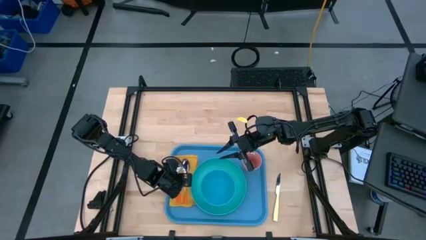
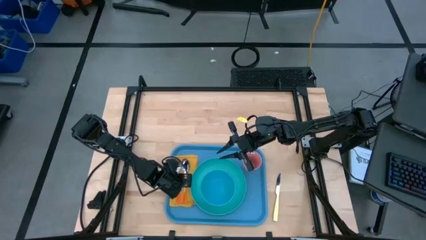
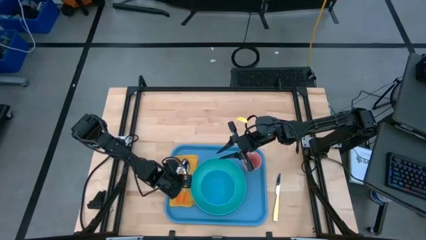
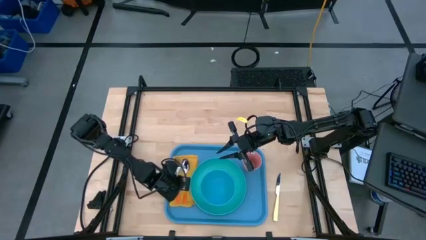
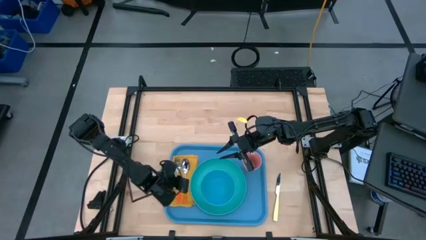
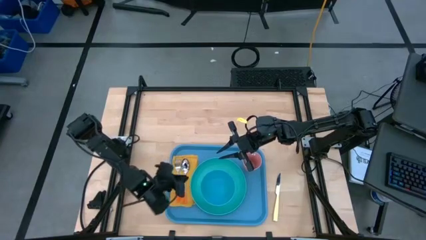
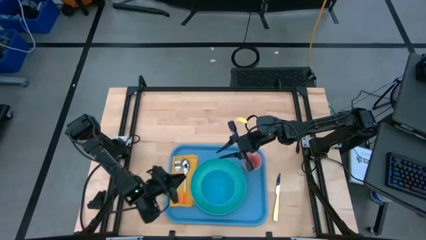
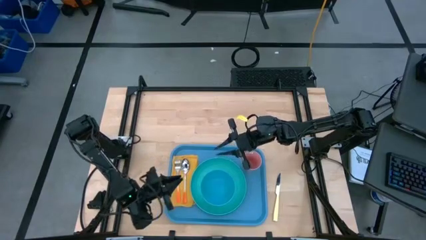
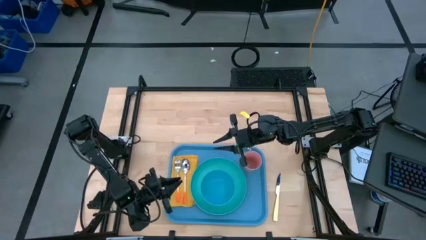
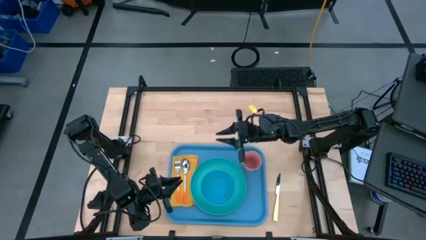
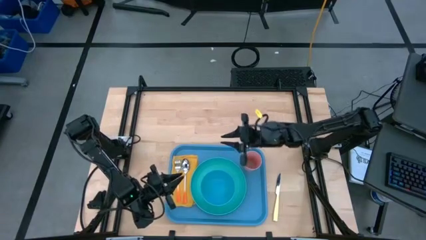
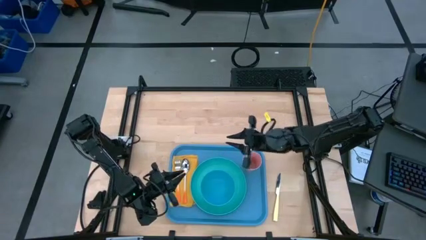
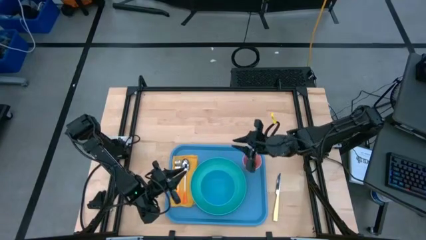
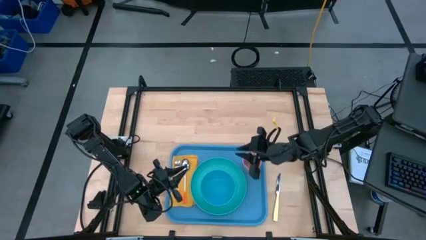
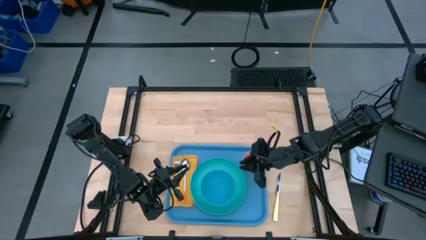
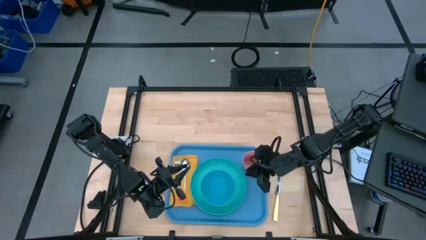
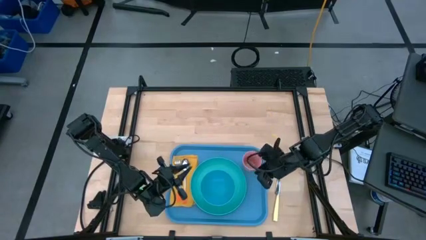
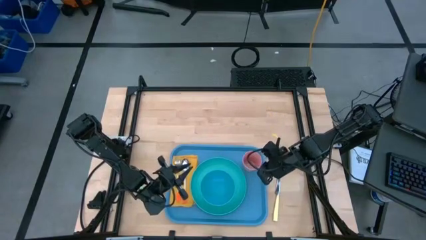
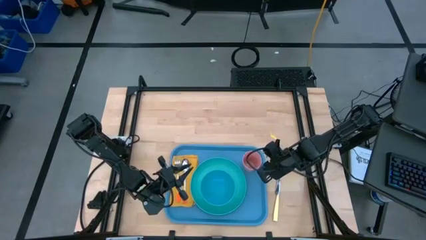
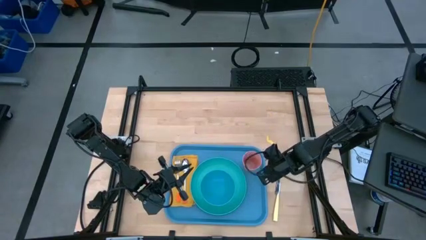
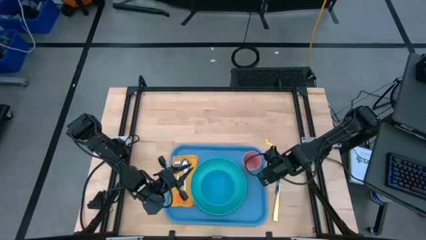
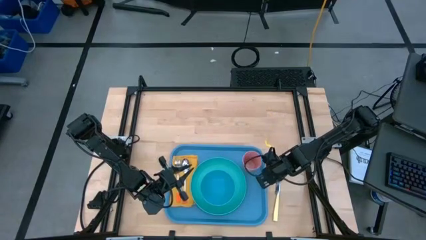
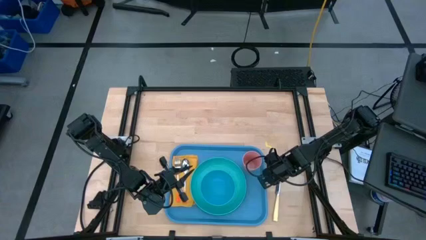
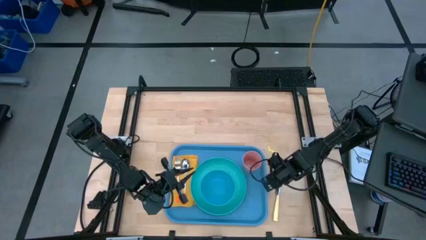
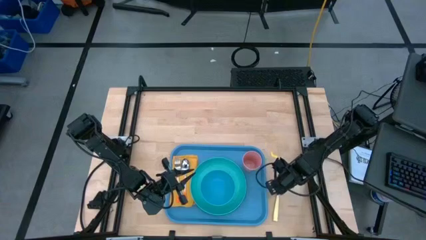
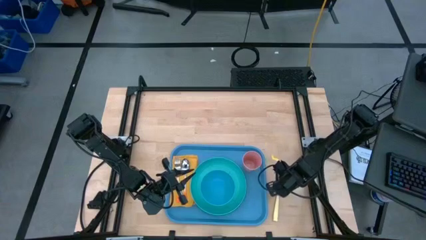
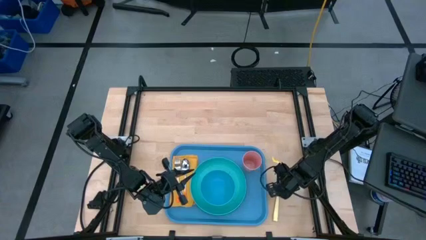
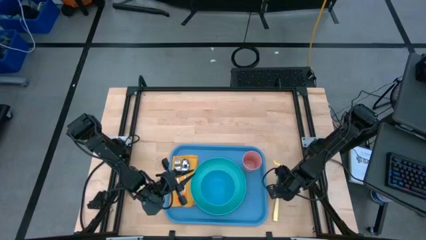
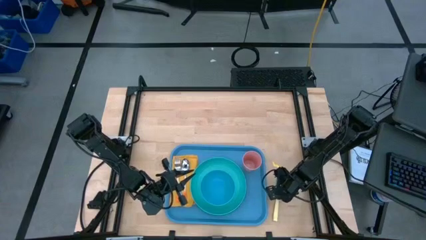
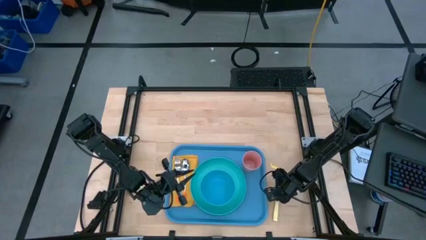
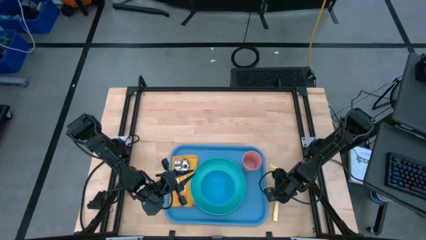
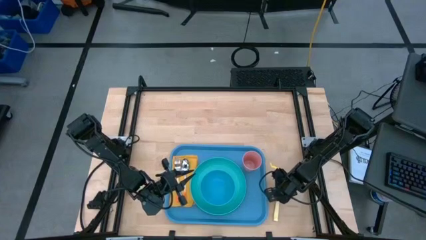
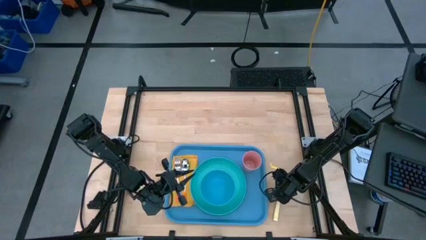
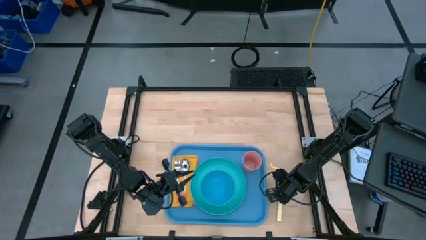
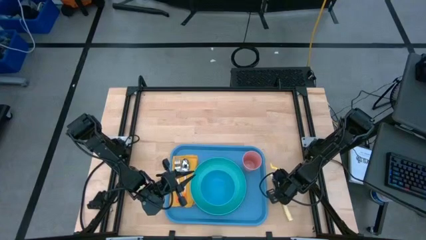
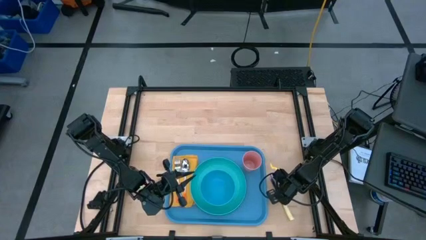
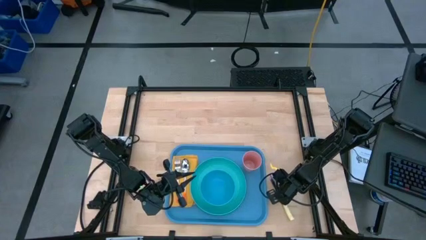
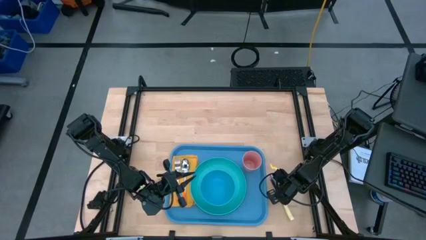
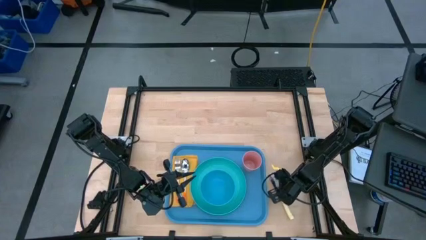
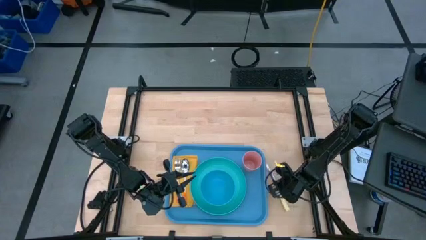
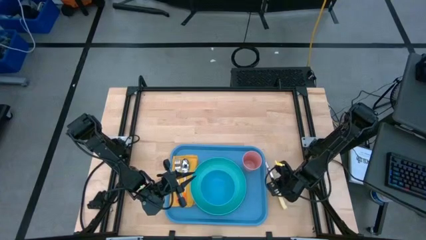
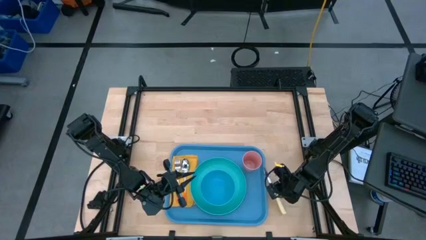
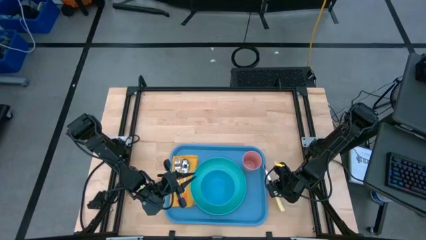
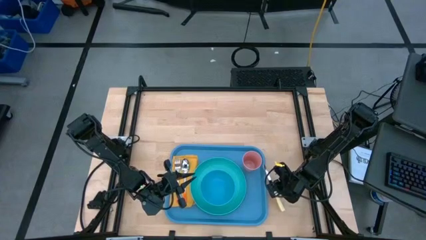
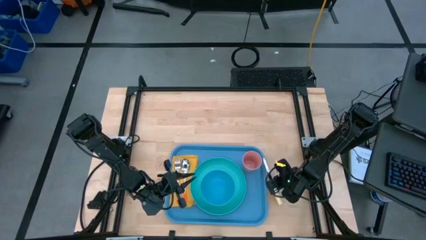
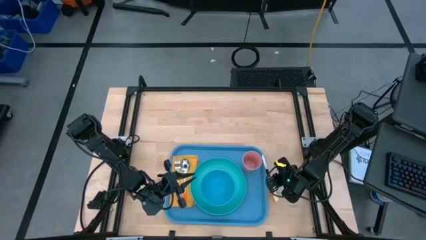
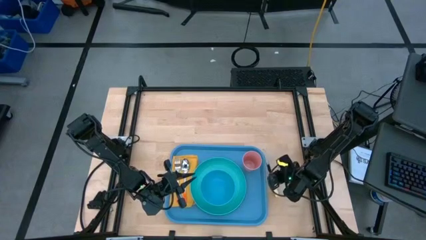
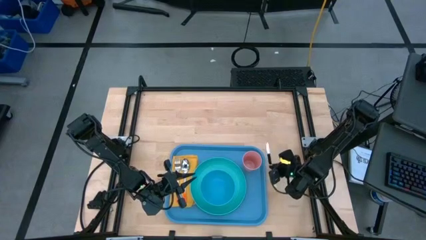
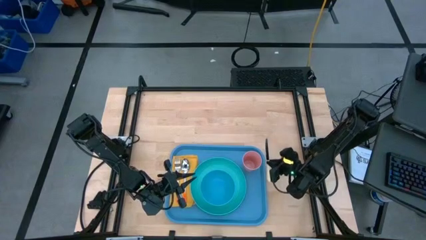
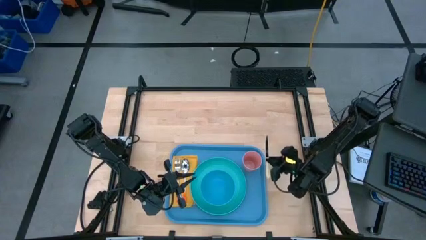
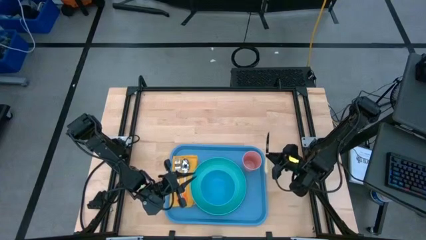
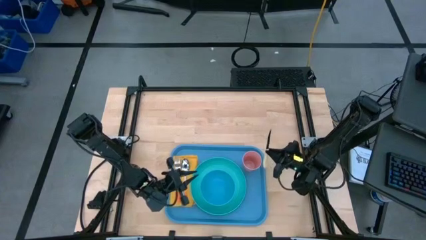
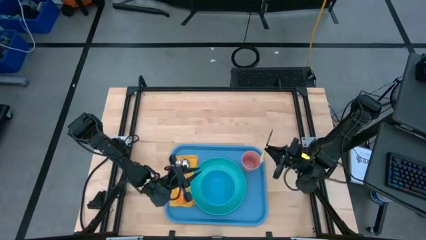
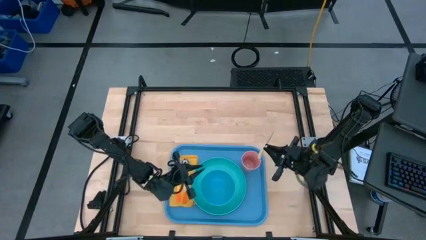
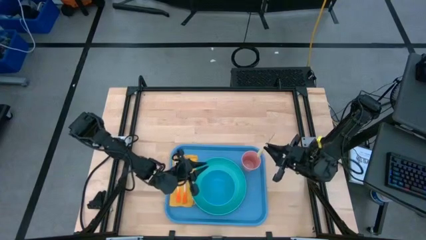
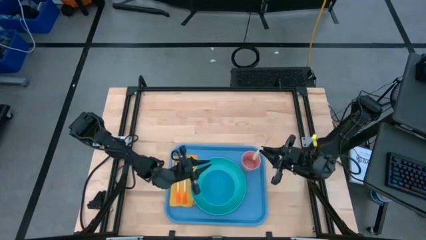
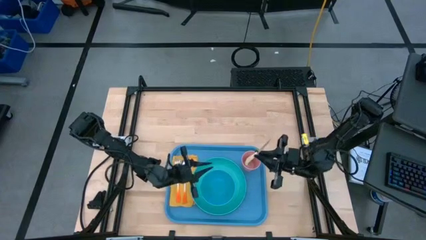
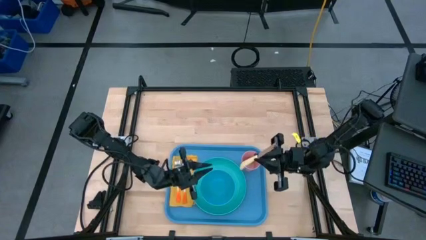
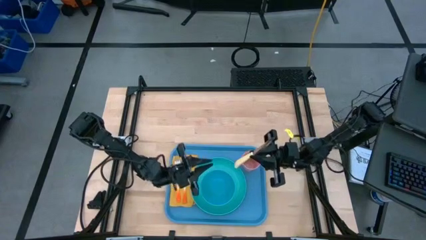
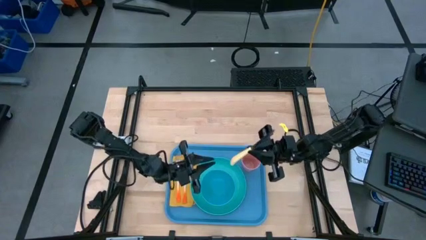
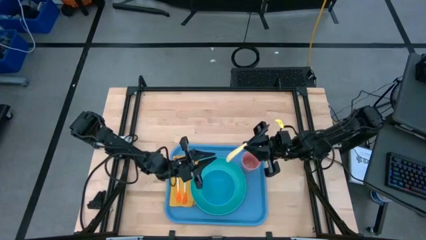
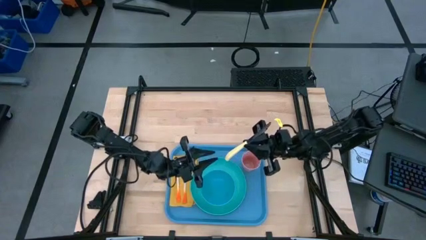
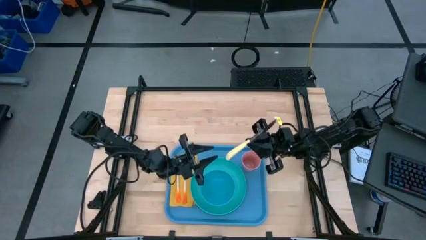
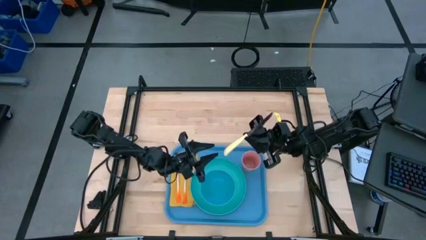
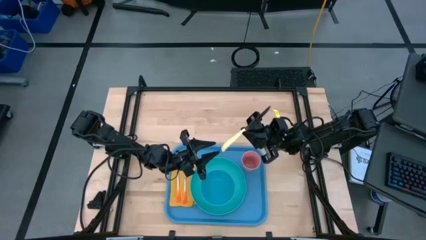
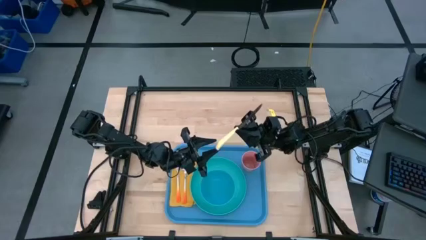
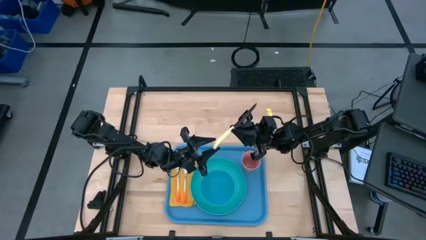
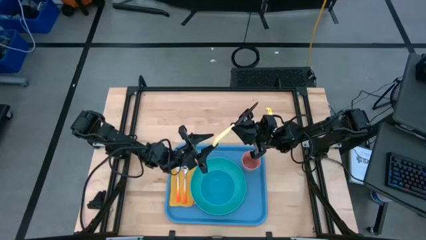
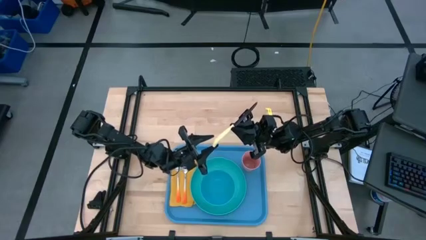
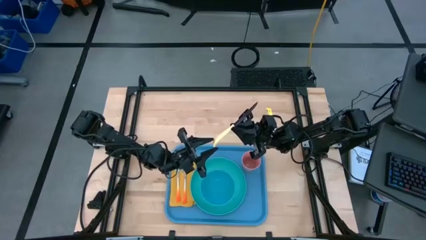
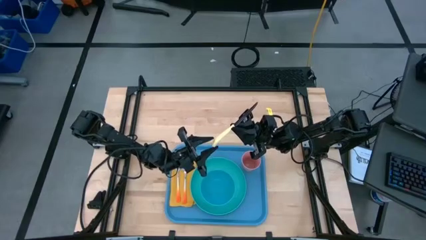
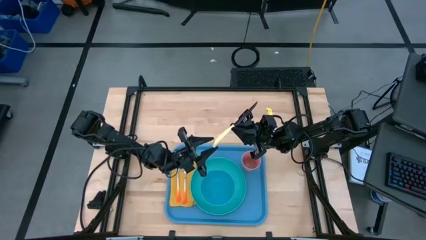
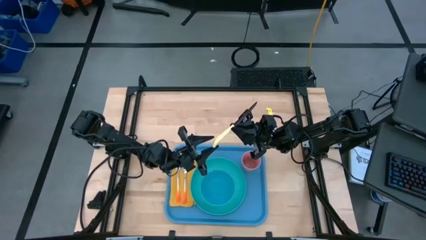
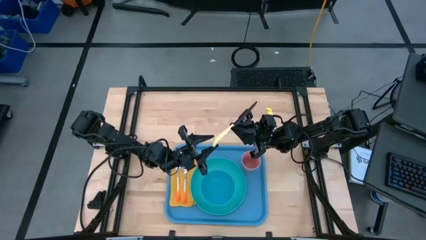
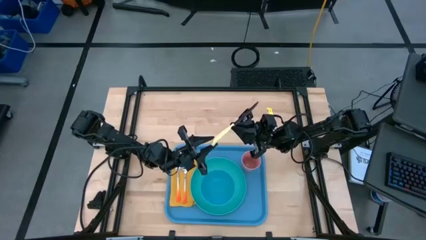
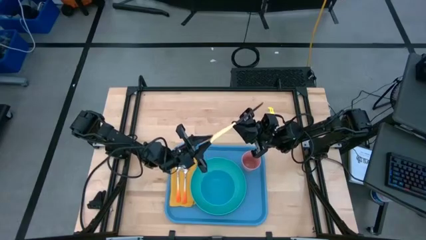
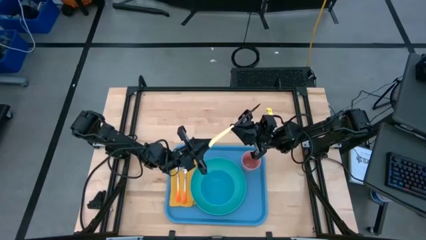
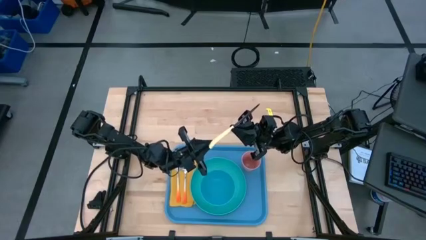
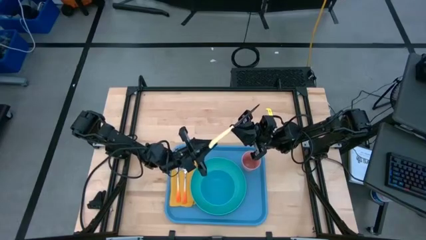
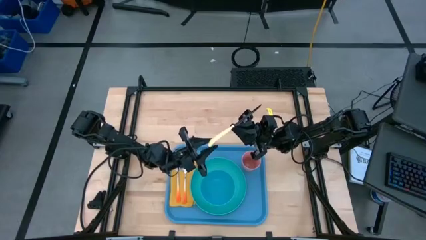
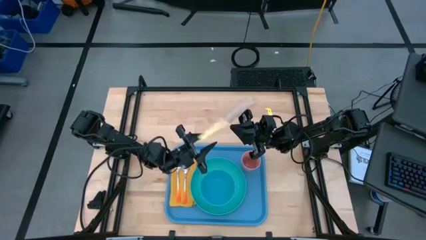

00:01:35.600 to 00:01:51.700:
Task: Set up tray
Put the yellow knife on top of the yellow napkin to the right of the orange spoon
